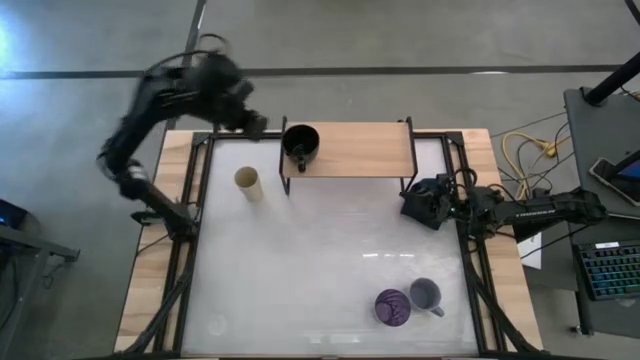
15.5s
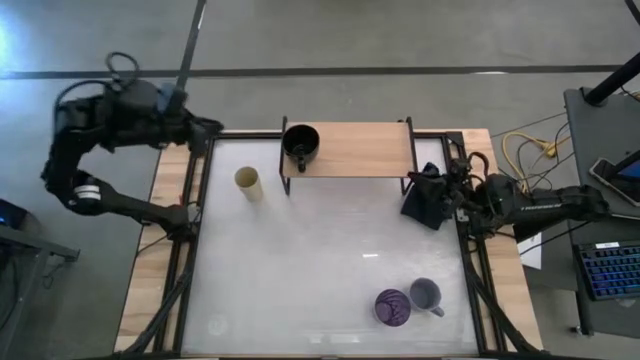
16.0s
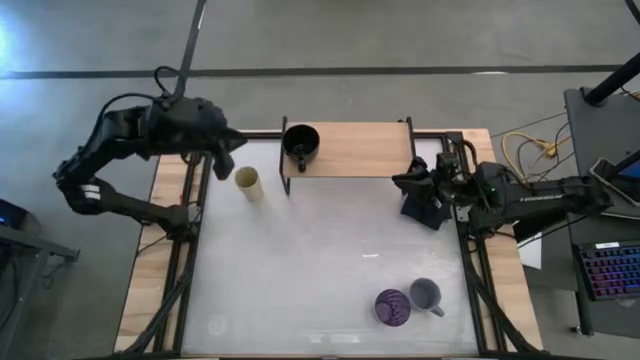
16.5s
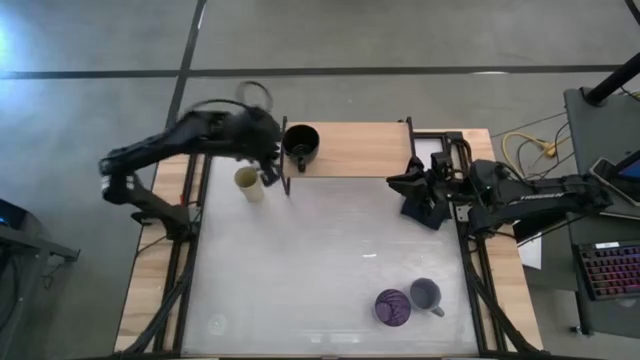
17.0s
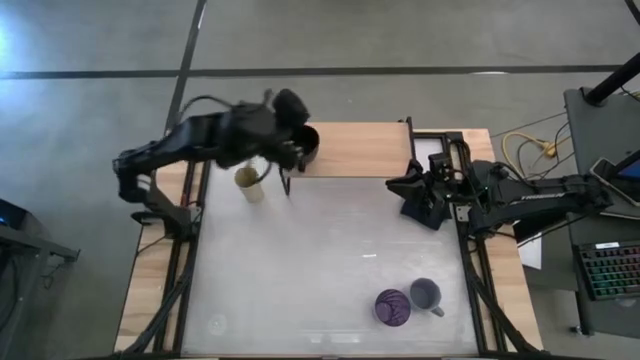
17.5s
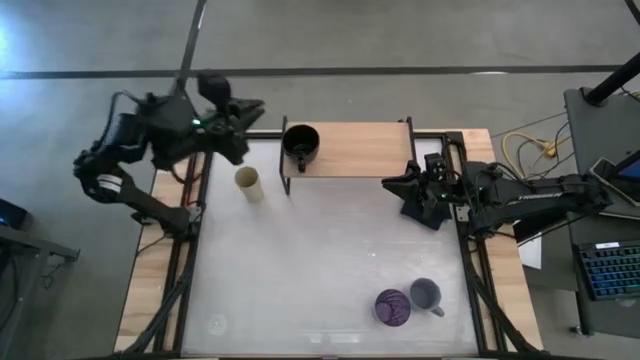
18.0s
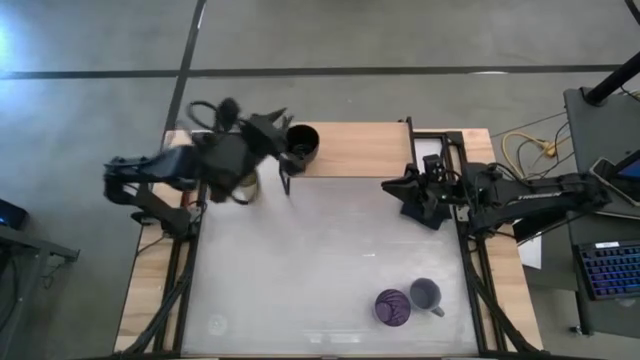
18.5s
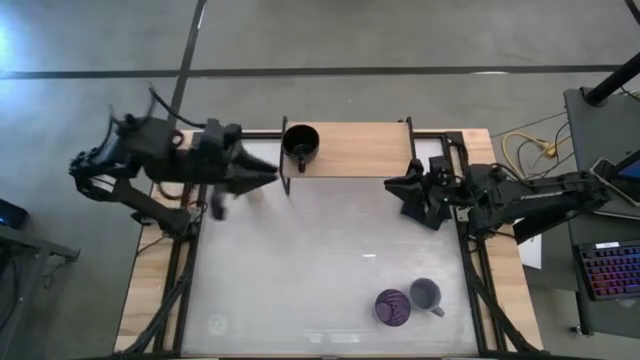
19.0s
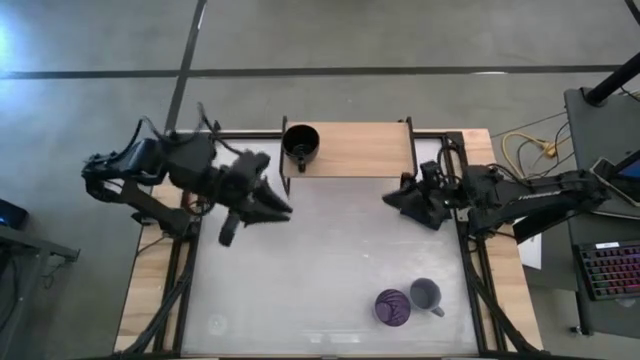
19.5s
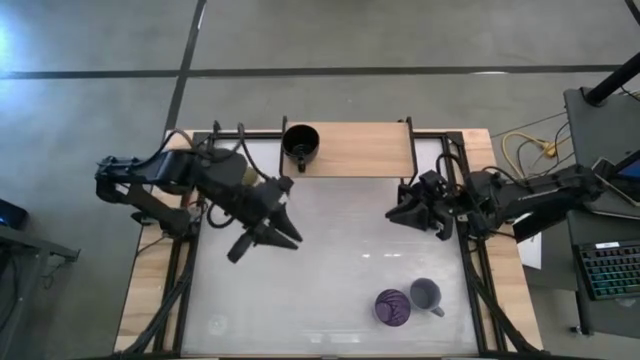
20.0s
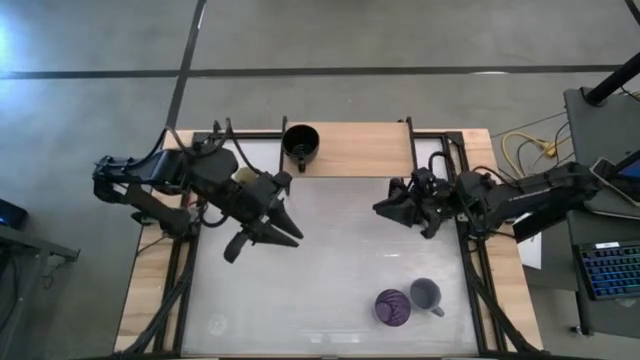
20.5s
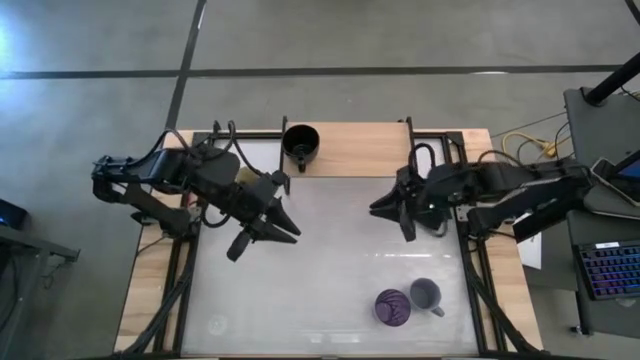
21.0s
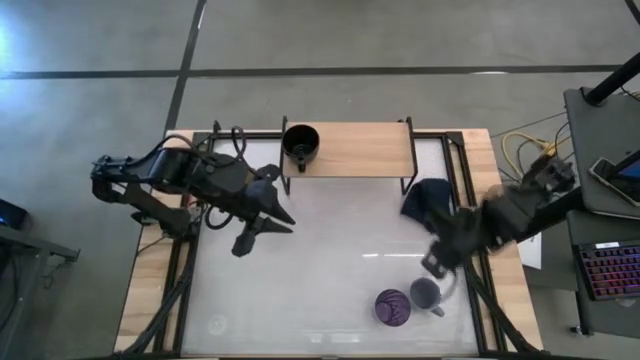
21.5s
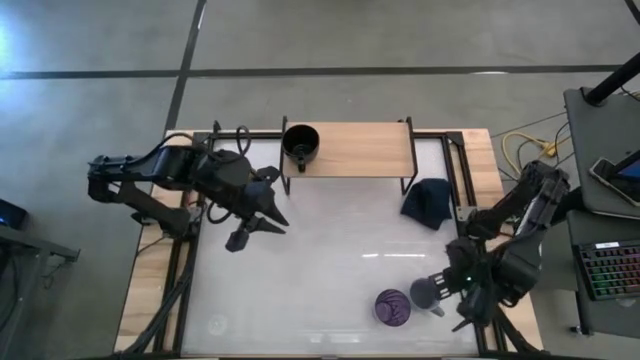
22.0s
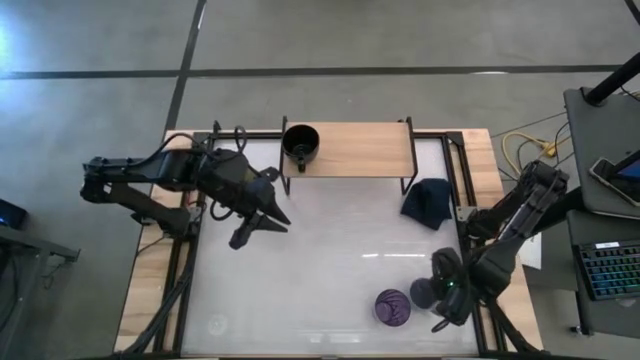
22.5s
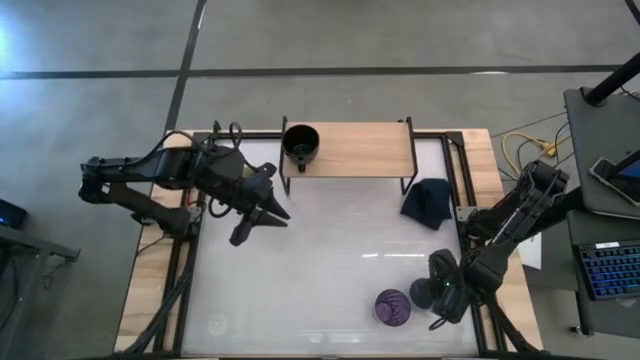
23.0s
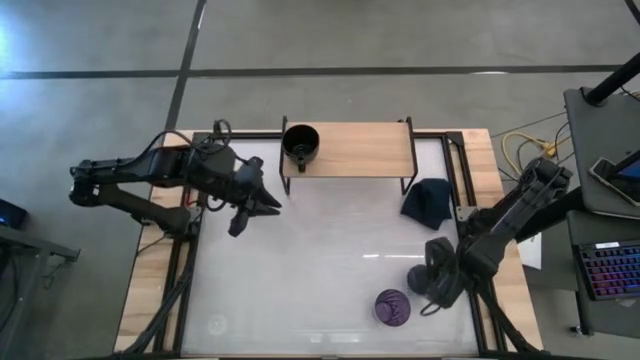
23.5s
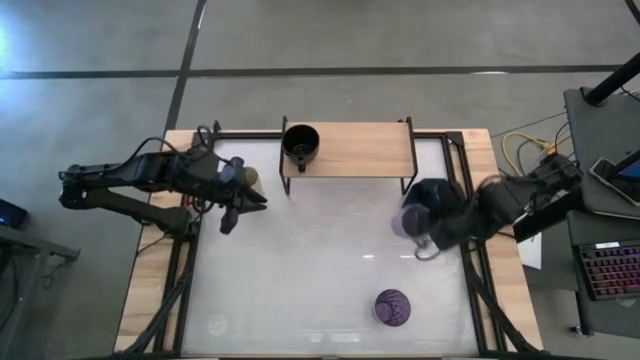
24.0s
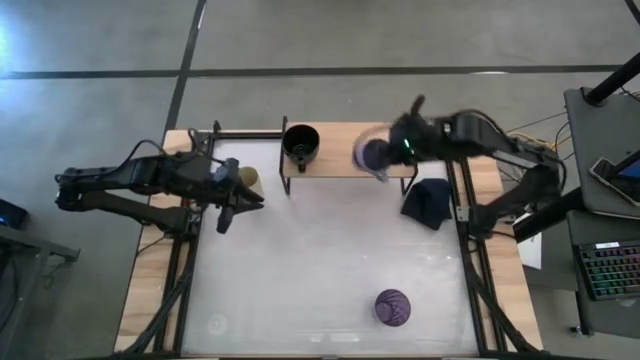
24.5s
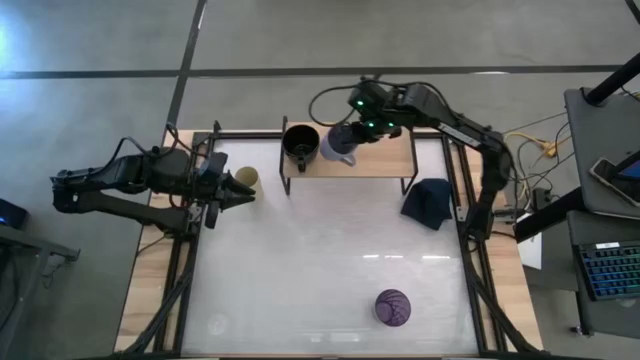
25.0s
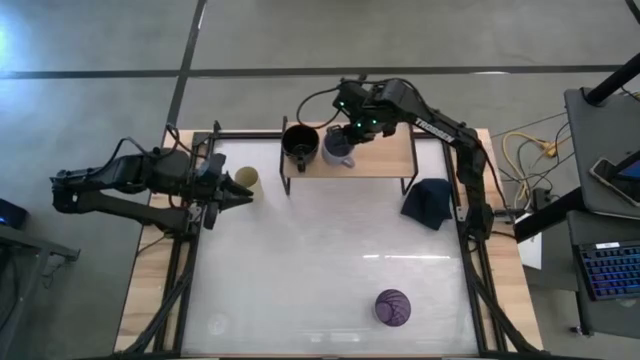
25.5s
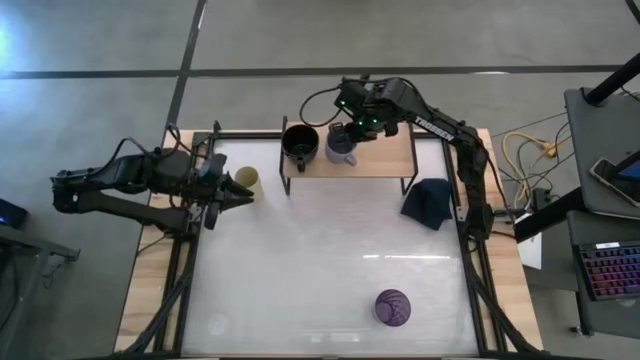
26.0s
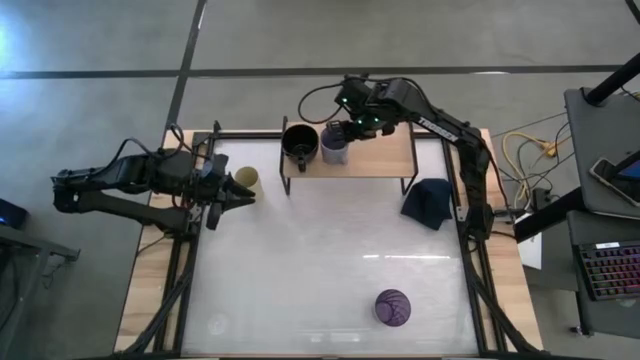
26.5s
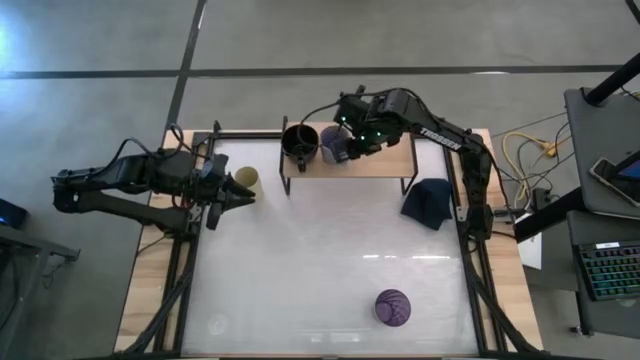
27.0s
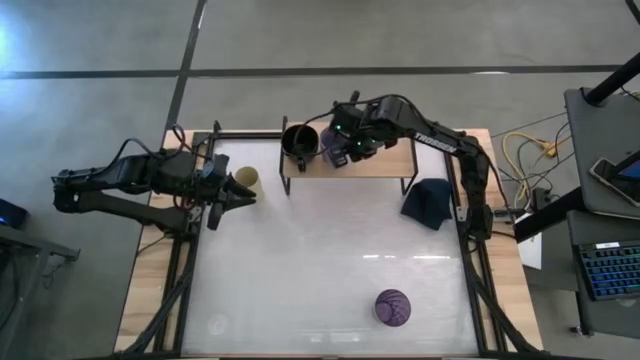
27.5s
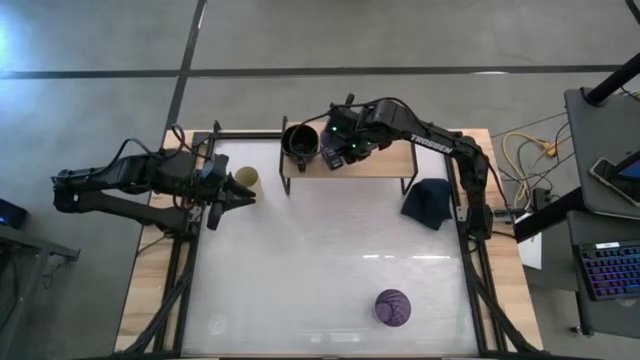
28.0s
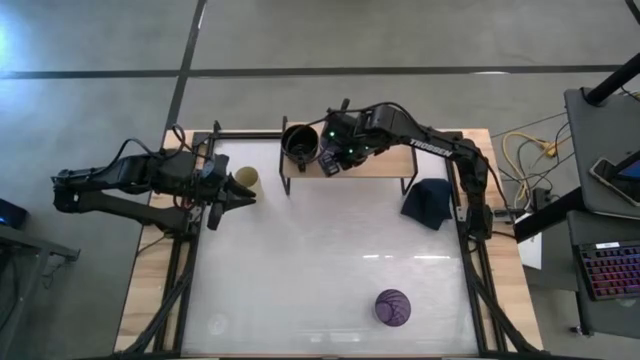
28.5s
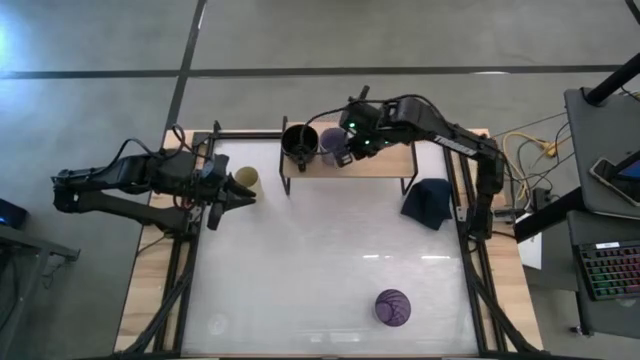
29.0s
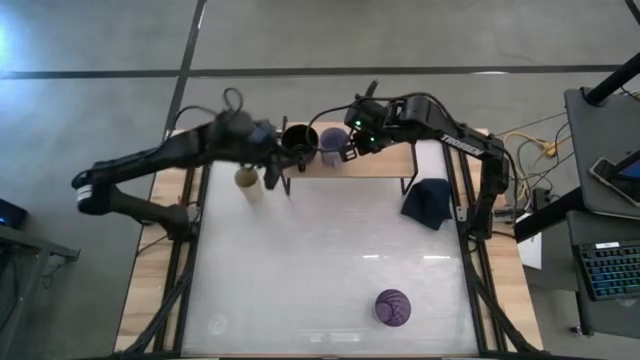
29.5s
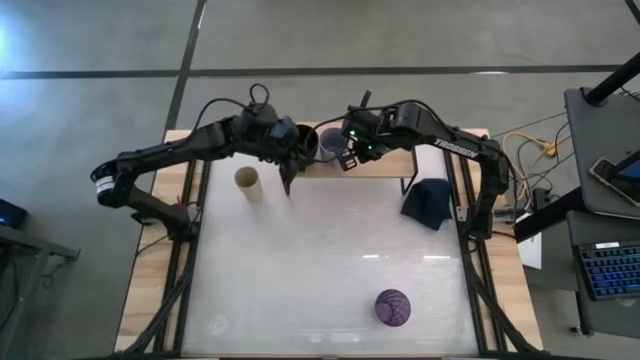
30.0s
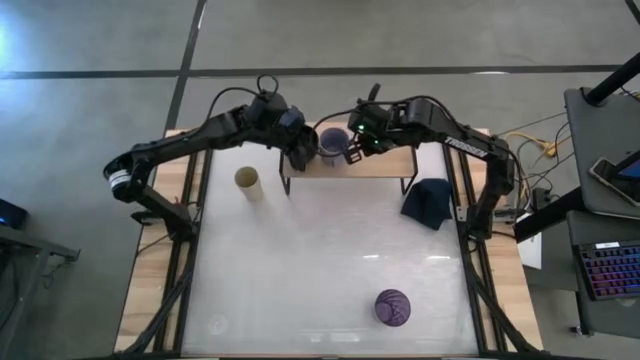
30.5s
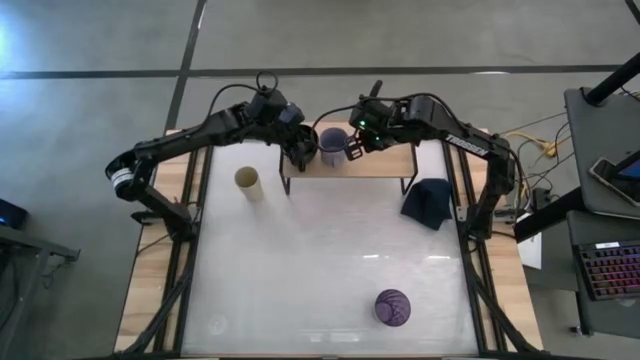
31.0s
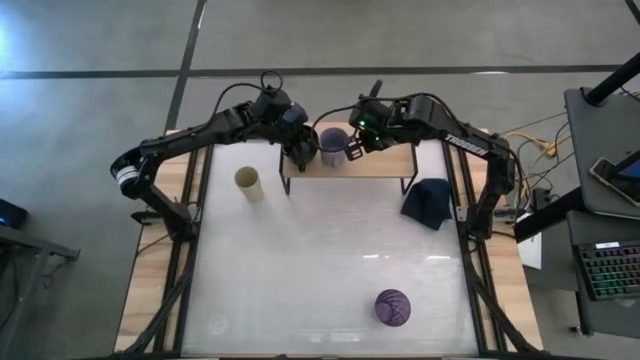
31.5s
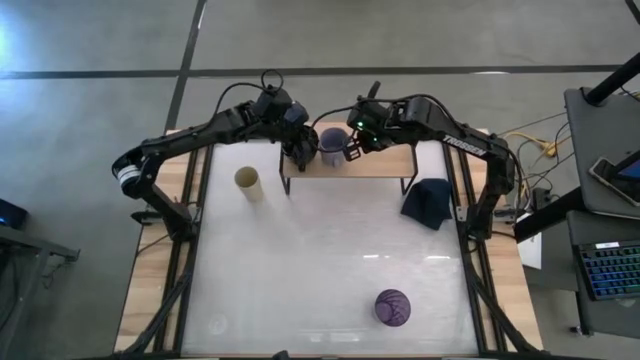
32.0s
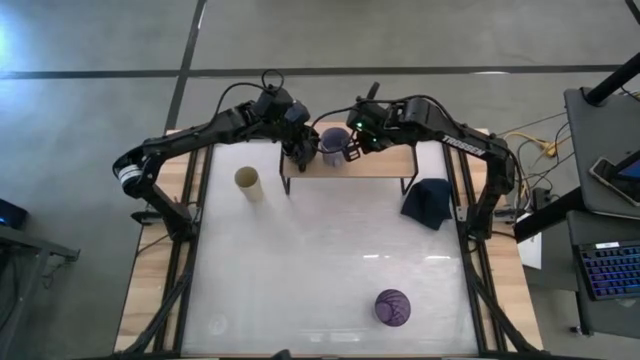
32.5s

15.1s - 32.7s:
Task: Stack small to large cups/mugs on shelf
Put the violet mug on the shelf

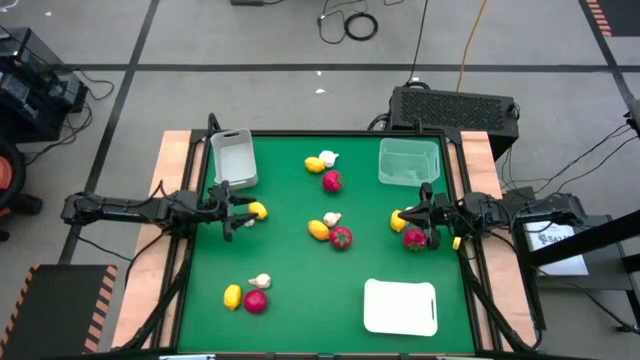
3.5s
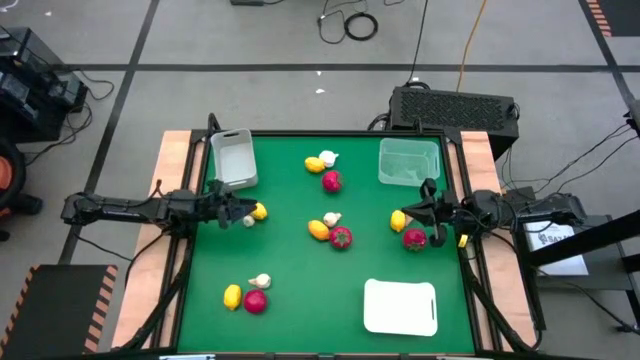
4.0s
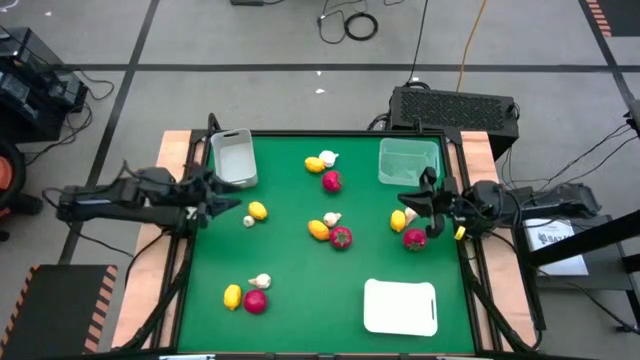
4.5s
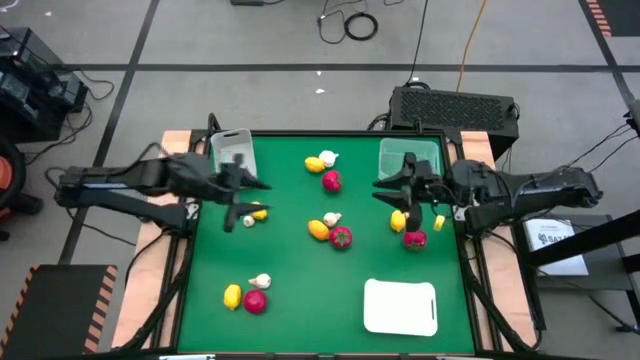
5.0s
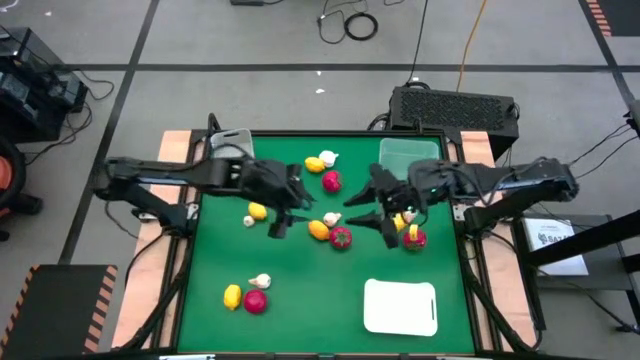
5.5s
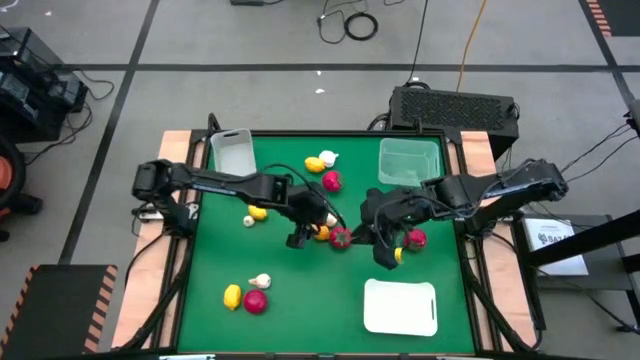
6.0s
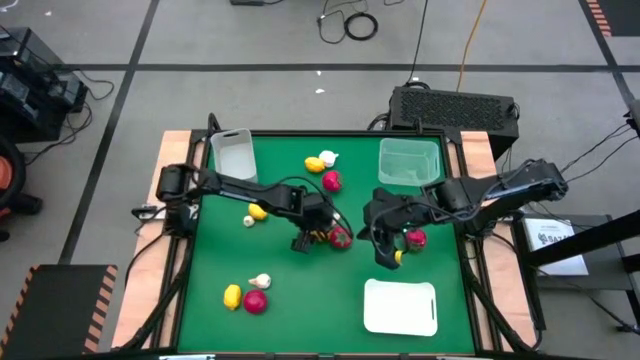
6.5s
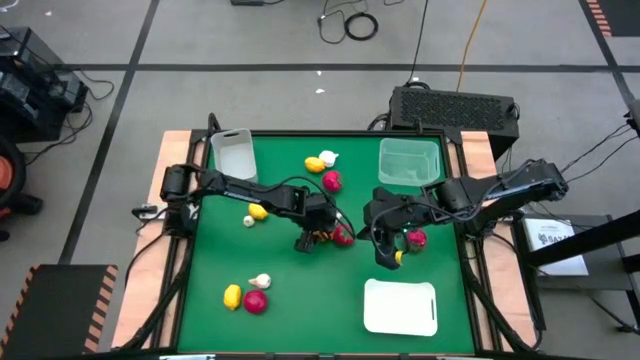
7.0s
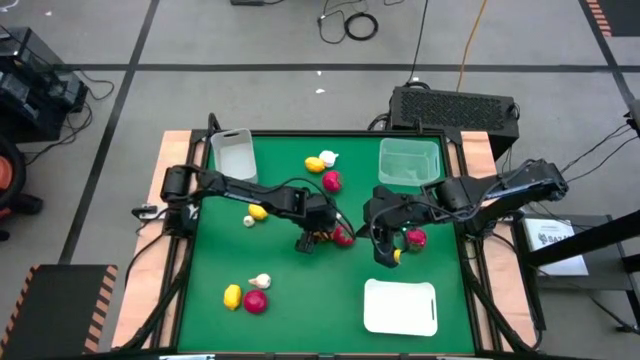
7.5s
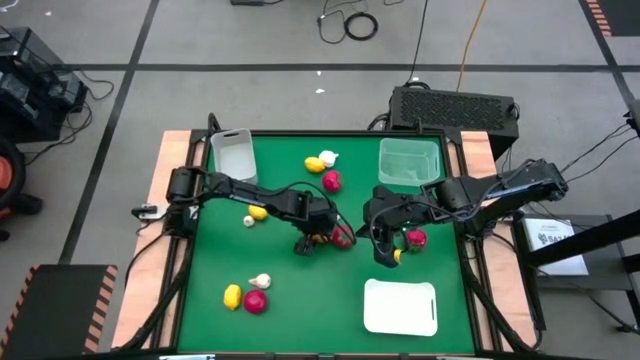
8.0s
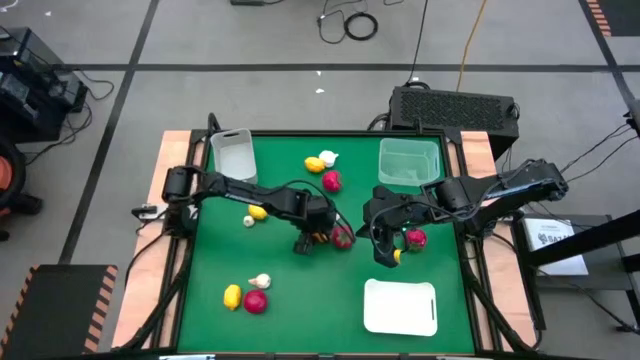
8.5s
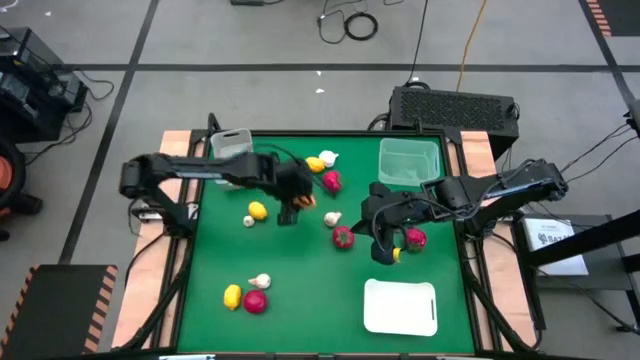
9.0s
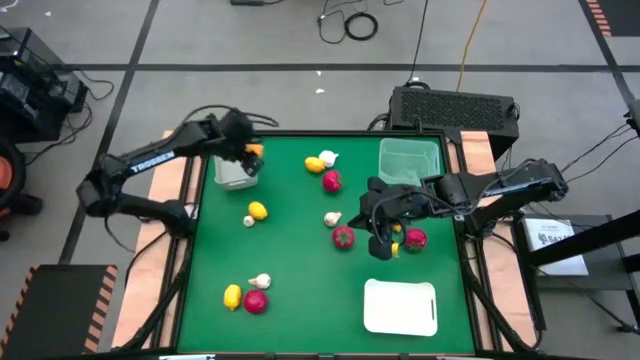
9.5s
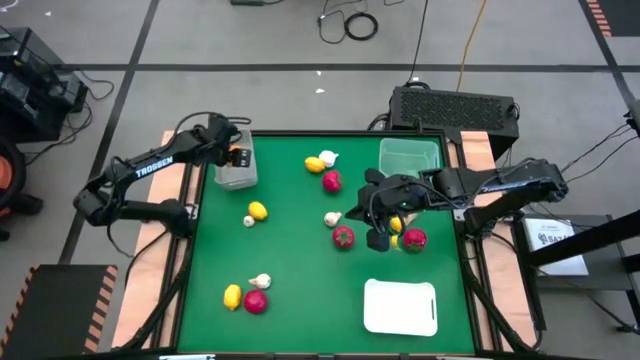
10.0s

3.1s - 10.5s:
Task: Sort produce into baskets
Put the yellow lemon in the gray bin
